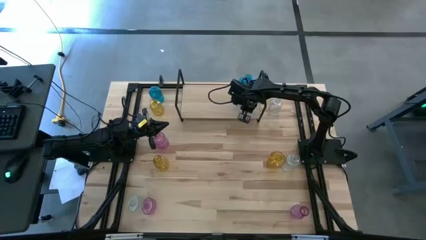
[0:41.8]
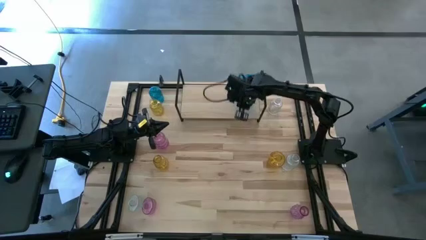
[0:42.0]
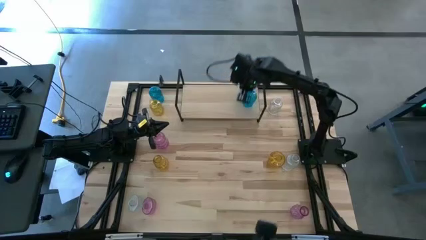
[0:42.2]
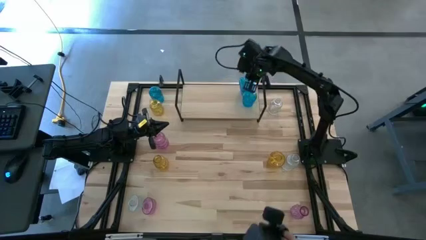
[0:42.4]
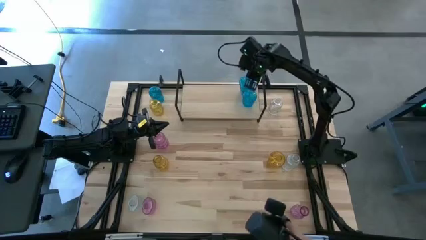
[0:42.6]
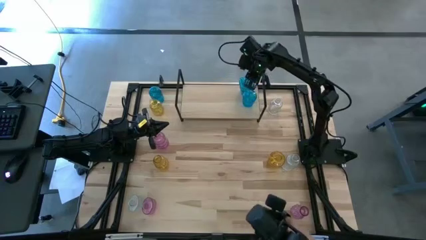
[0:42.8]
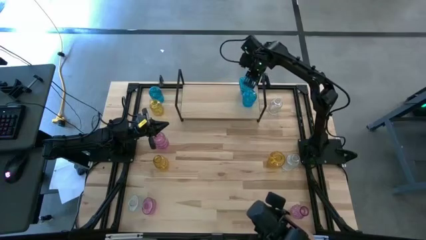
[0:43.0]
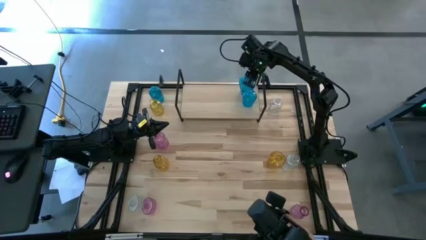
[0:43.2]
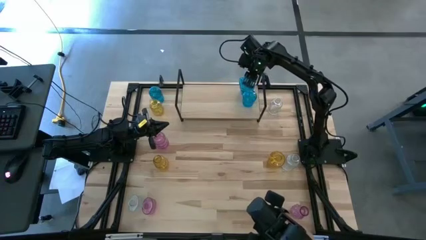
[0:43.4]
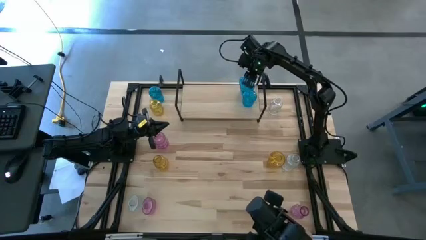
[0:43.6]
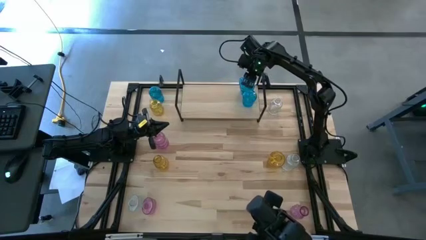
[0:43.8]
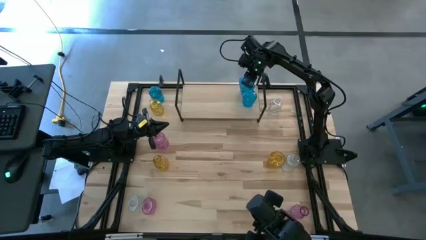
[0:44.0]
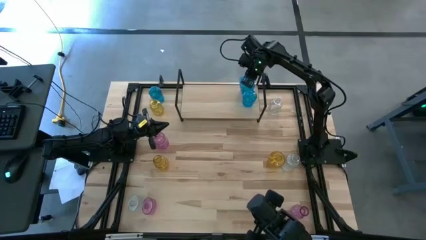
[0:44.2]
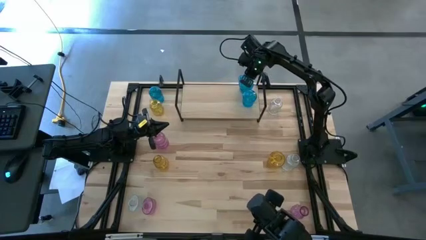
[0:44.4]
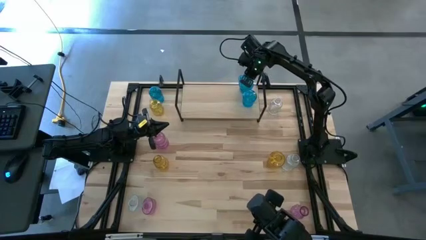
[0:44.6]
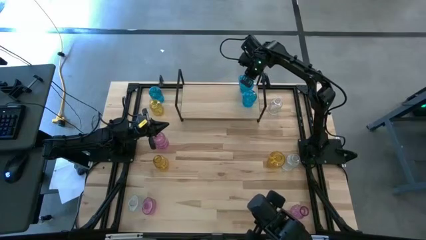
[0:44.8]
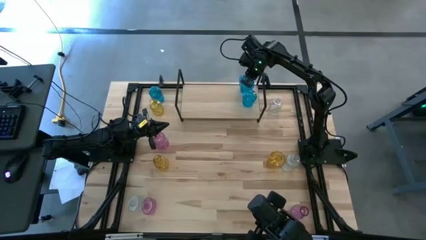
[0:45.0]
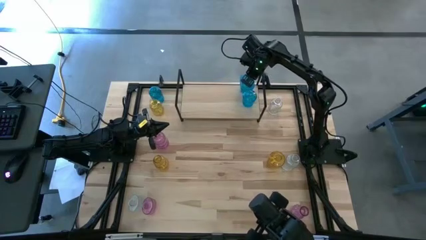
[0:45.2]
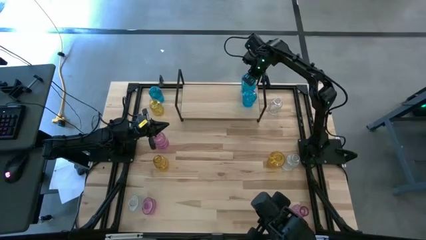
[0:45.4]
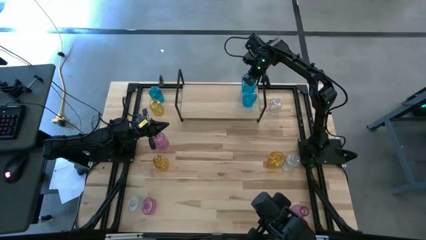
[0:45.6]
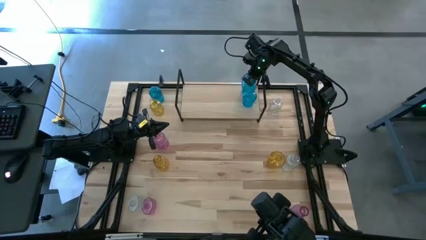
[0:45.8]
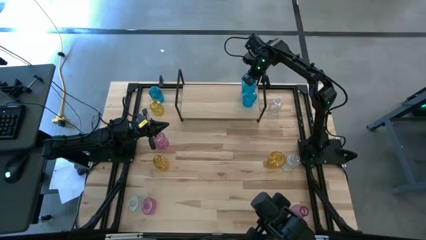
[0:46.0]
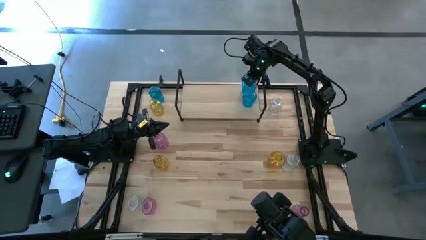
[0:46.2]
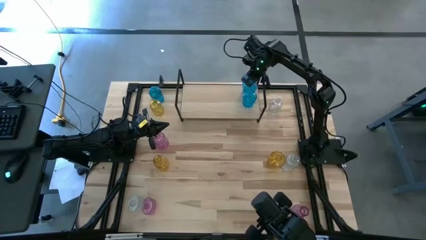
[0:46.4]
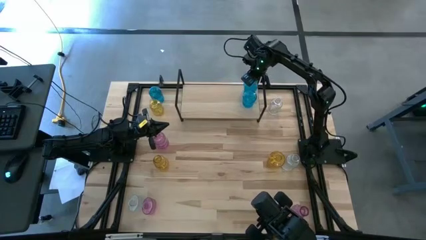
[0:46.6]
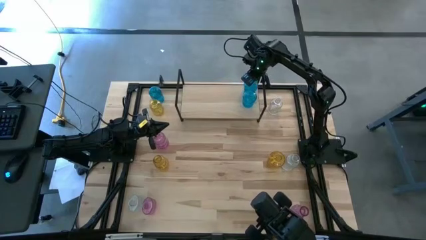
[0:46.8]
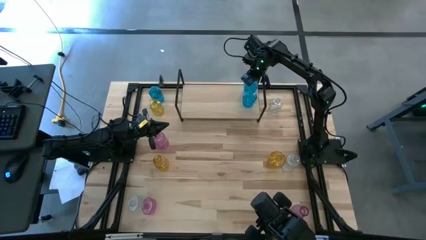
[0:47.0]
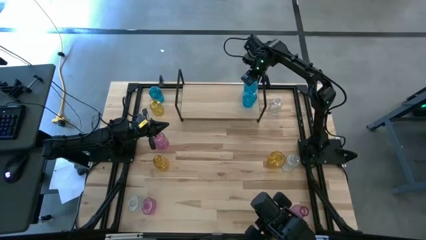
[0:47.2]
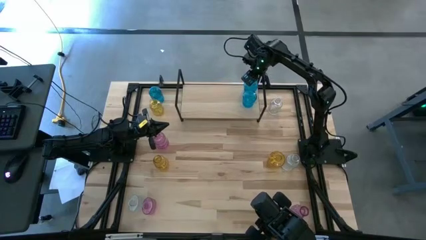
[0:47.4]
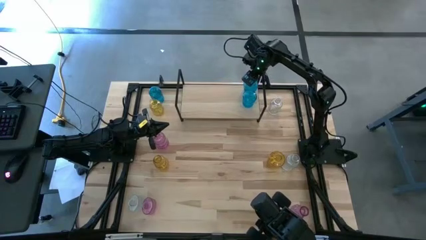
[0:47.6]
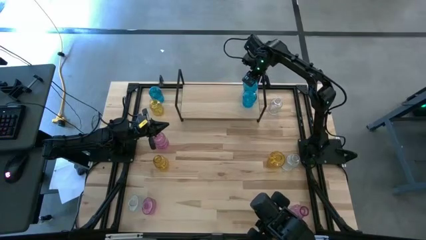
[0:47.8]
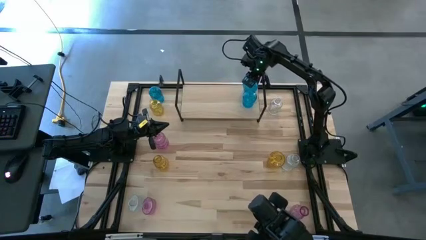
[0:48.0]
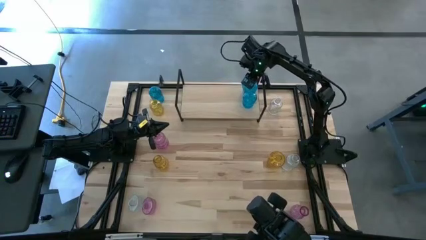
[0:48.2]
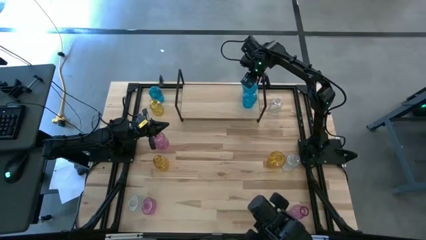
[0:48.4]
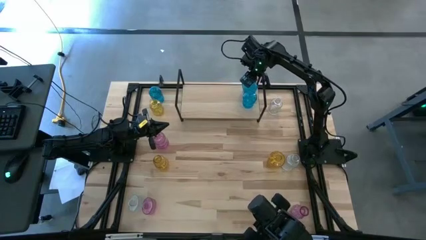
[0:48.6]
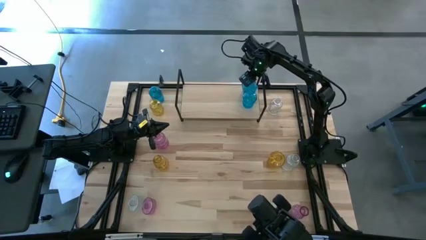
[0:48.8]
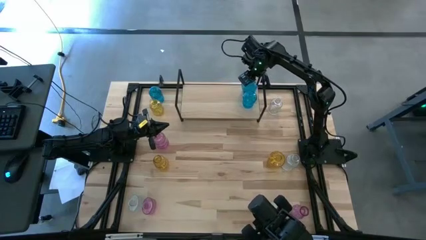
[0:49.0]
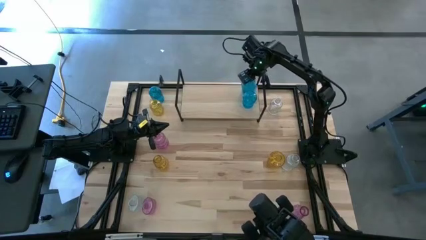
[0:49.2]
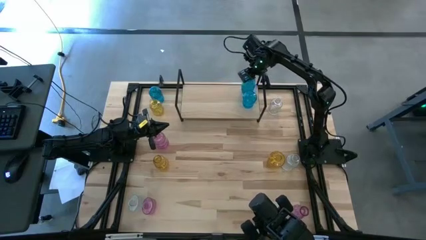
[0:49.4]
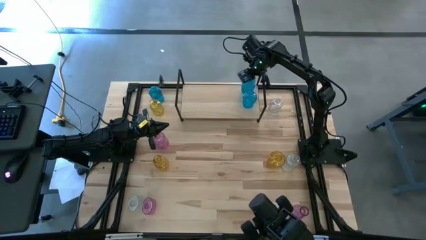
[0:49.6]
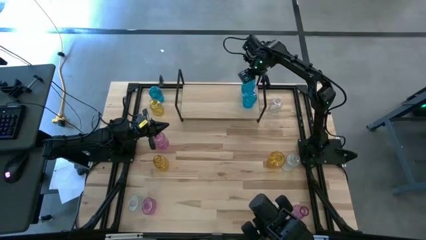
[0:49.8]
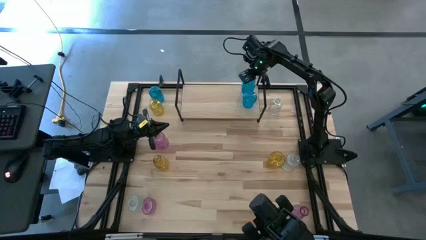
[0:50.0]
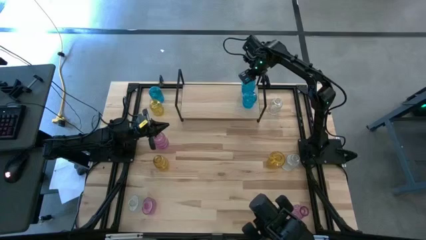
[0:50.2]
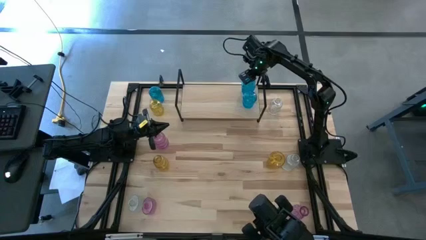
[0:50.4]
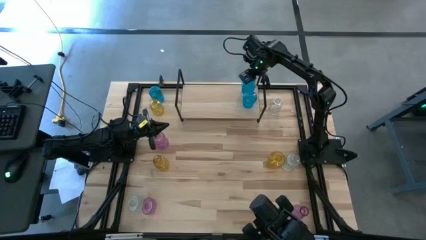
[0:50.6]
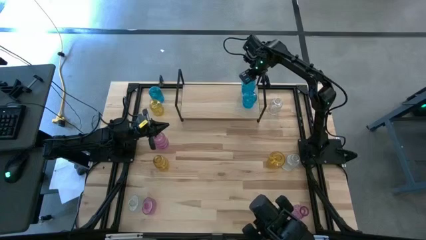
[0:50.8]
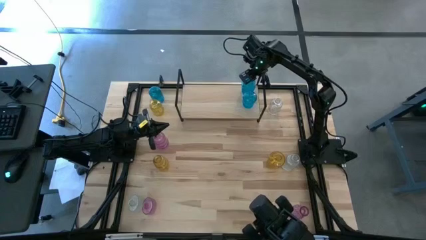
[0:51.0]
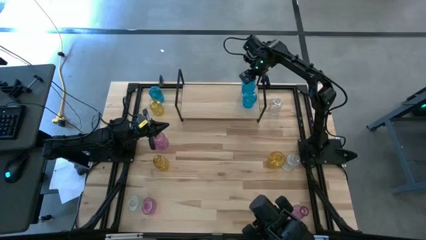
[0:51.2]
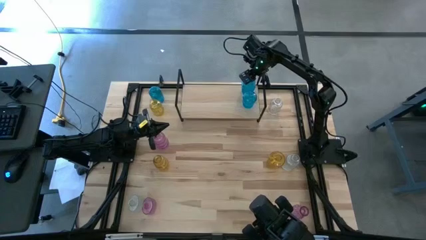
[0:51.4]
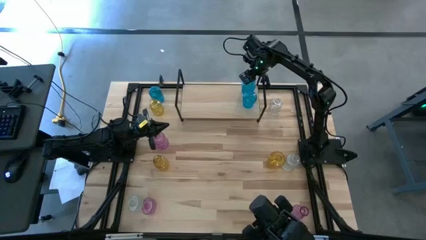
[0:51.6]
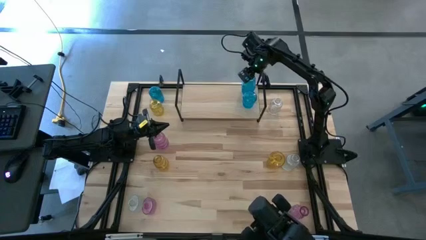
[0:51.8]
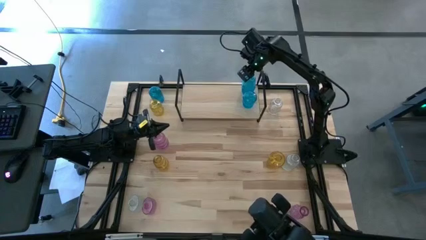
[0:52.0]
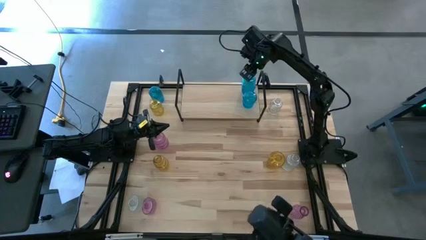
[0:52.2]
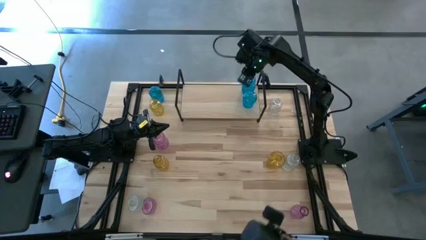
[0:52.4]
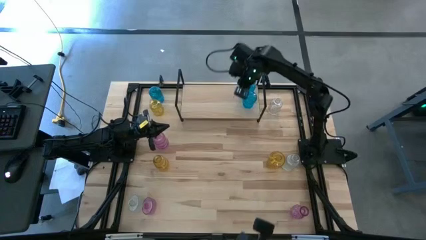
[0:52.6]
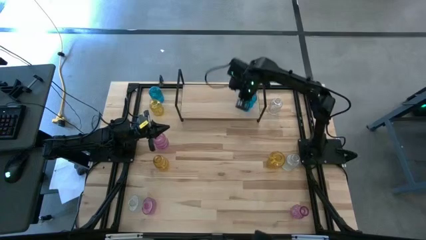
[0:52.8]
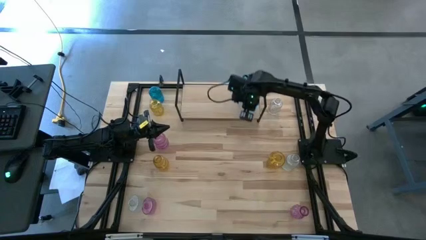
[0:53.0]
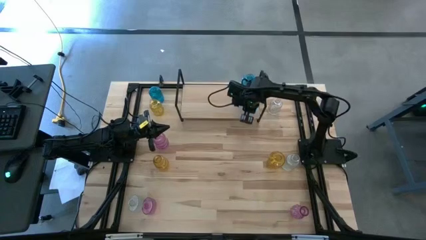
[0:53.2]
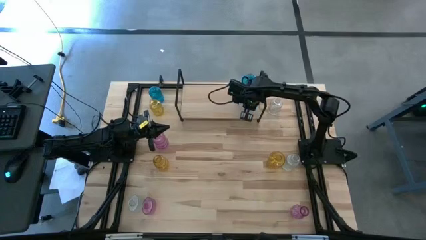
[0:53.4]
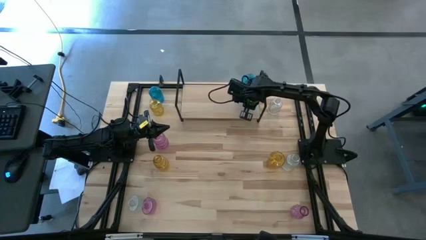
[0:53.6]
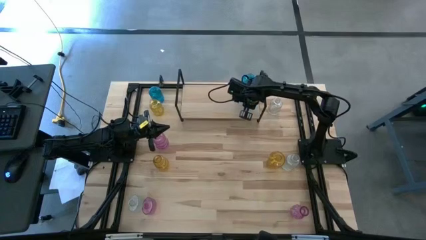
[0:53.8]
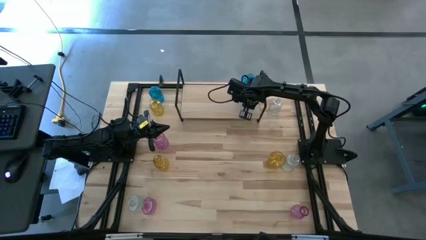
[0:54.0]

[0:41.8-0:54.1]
Task: sort vases onto shelf
Adjust the blue vases on the shelf

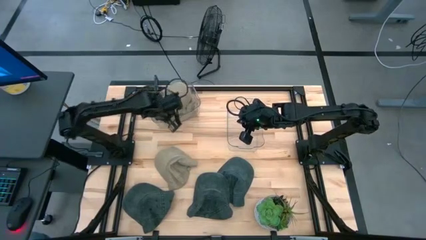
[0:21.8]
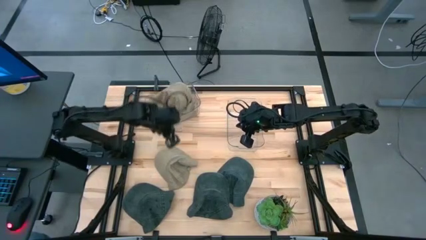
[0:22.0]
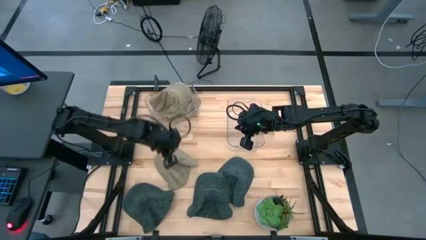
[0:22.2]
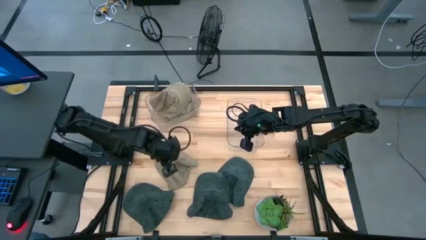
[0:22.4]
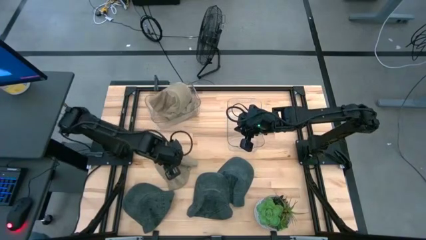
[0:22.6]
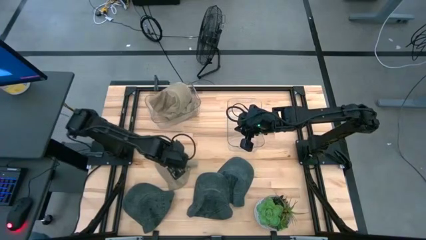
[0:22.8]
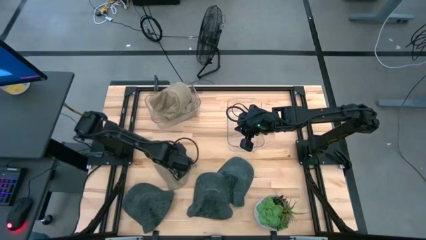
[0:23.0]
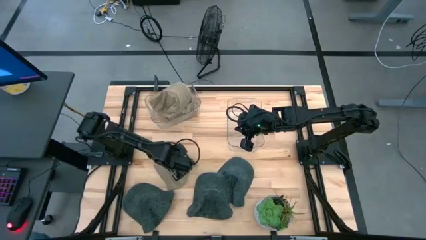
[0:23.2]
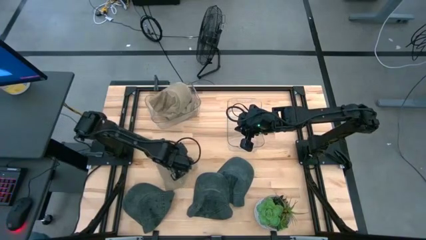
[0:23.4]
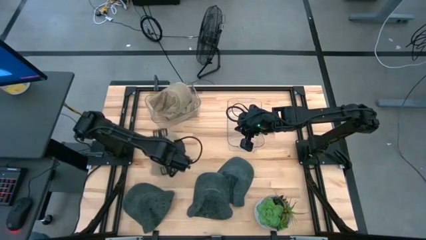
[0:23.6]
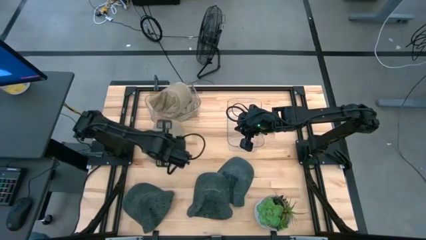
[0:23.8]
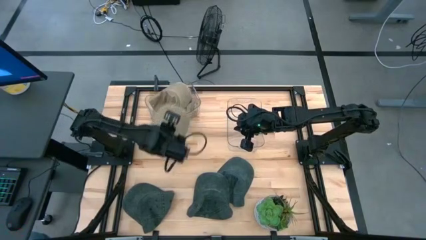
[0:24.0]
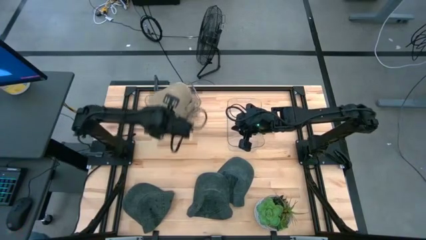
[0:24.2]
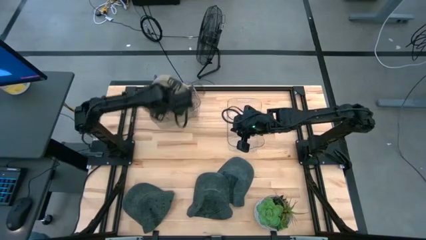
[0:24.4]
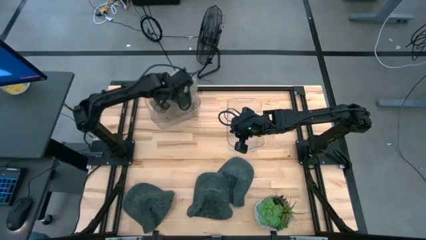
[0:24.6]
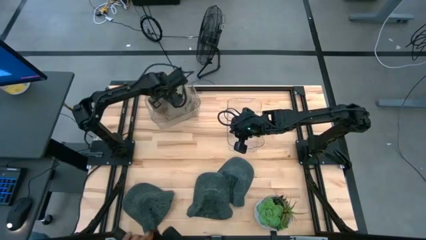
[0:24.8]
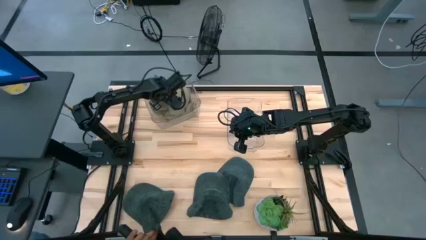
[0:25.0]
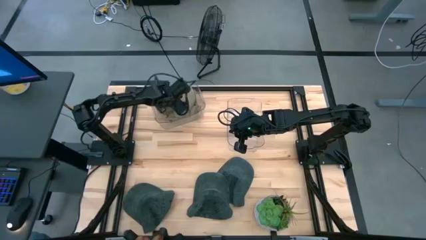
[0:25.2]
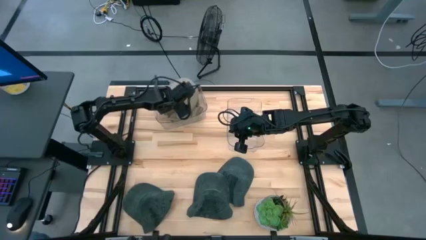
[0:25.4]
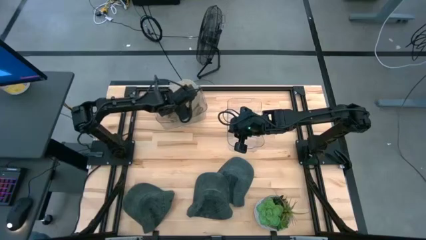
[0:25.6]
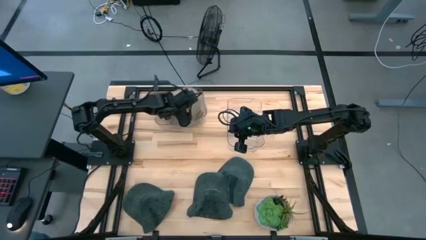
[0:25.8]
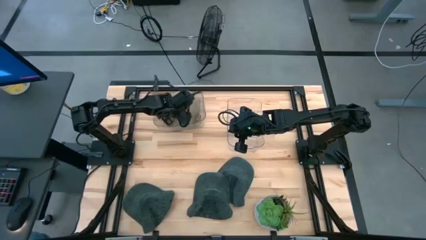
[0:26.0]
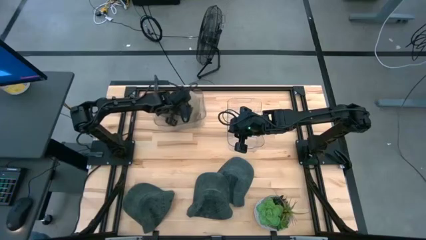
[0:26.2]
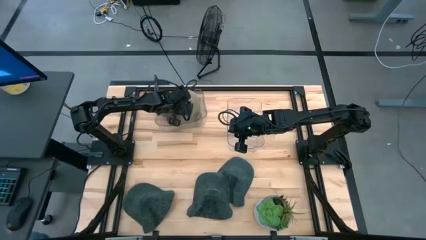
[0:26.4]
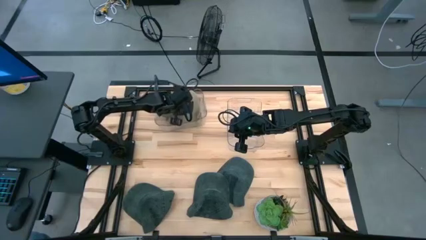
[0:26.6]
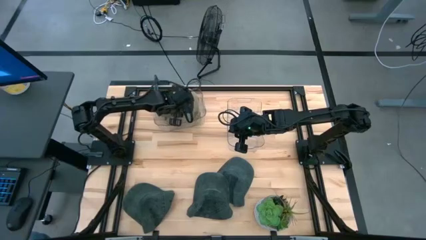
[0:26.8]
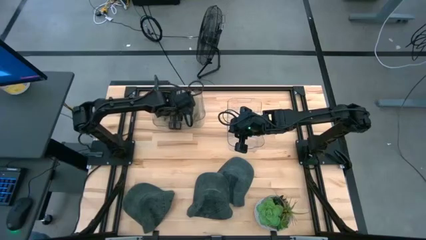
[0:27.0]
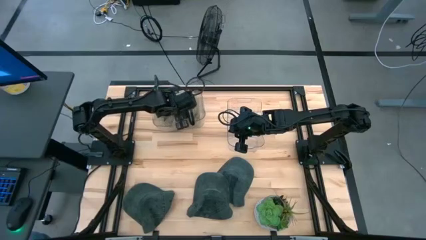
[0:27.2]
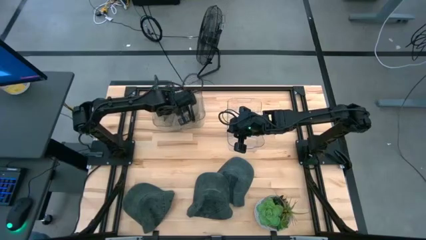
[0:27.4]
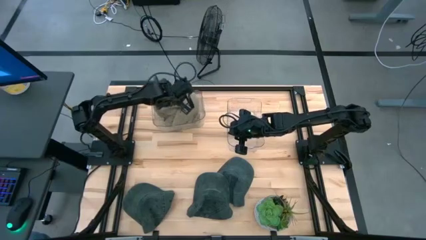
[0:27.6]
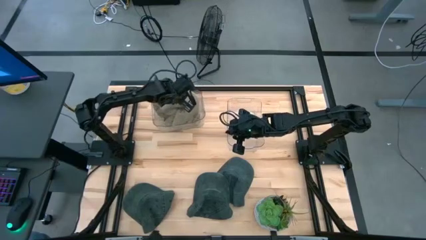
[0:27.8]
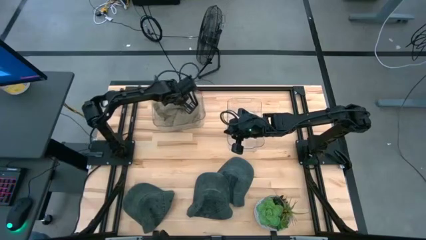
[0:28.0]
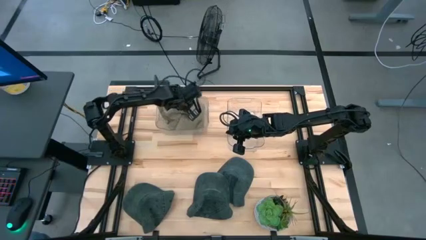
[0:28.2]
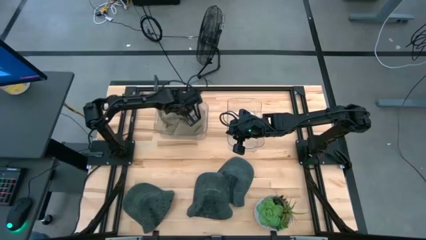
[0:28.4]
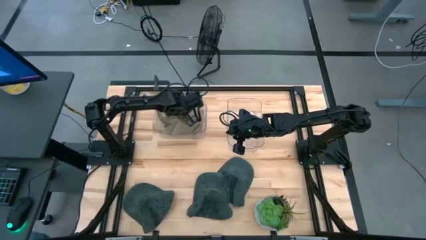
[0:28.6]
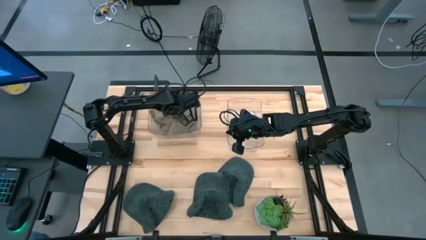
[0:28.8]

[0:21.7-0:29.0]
Task: Pick & Place hat
Put the brown cap into the left transparent bin
